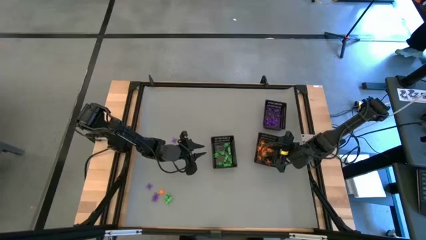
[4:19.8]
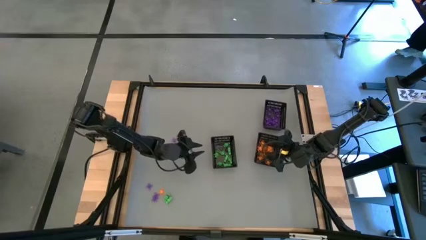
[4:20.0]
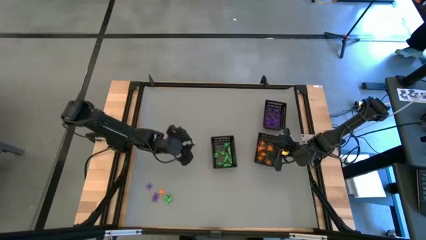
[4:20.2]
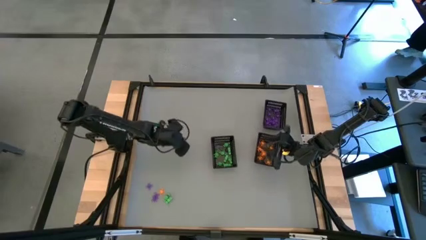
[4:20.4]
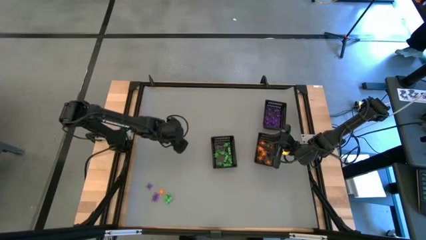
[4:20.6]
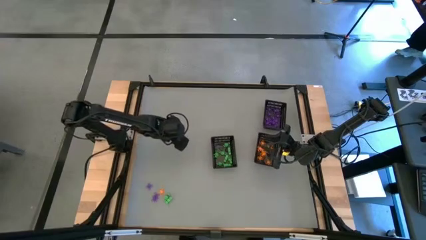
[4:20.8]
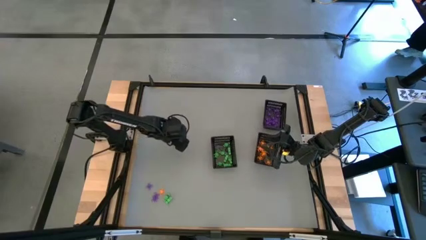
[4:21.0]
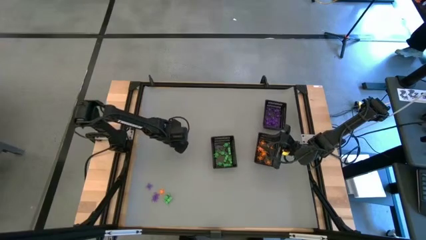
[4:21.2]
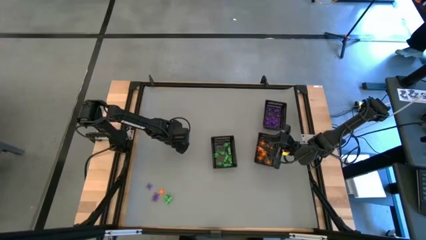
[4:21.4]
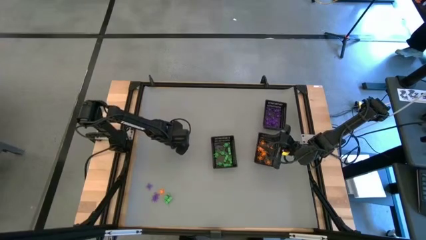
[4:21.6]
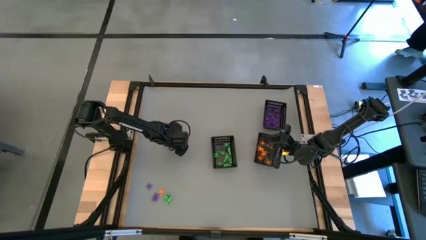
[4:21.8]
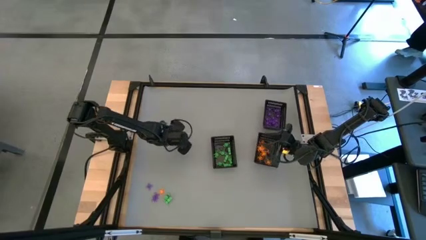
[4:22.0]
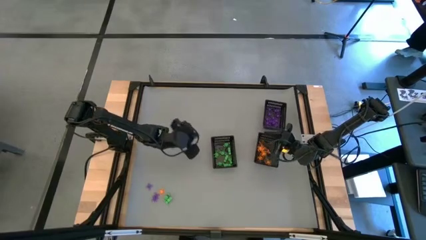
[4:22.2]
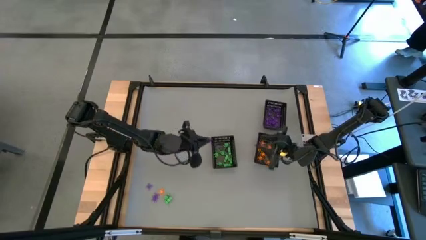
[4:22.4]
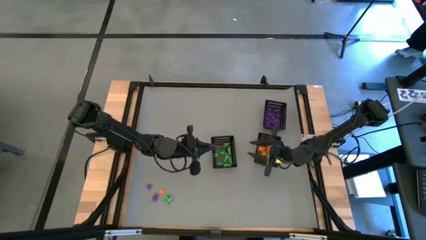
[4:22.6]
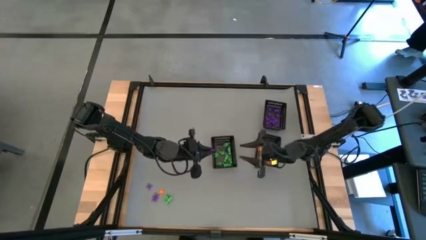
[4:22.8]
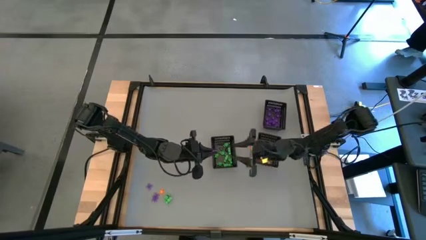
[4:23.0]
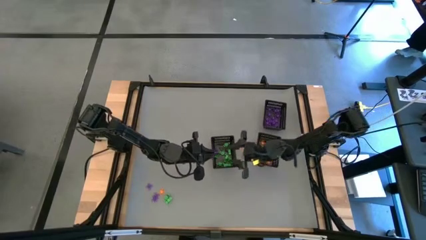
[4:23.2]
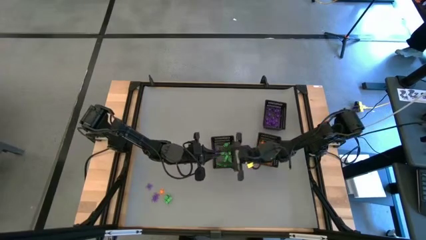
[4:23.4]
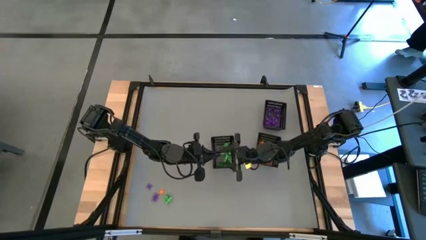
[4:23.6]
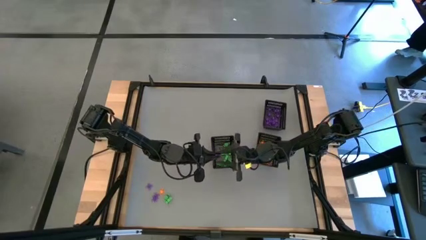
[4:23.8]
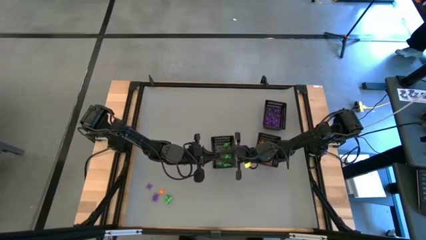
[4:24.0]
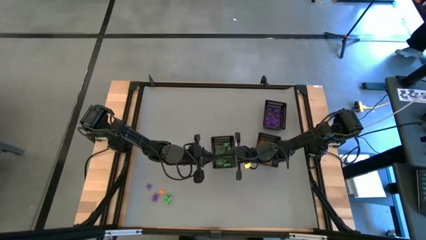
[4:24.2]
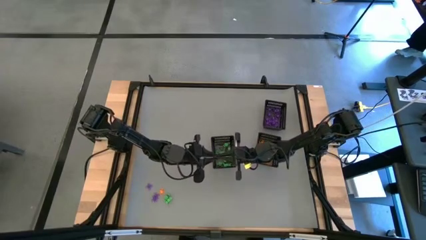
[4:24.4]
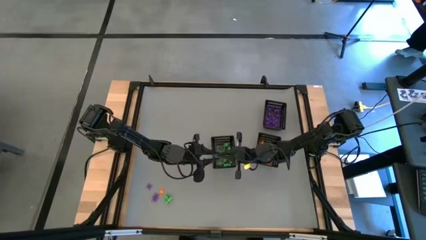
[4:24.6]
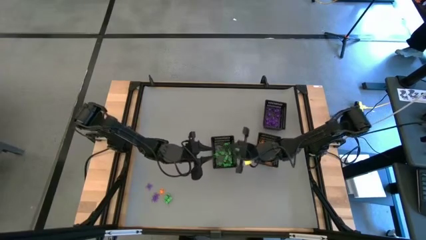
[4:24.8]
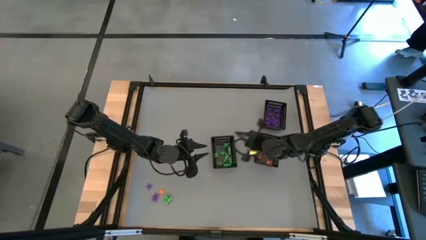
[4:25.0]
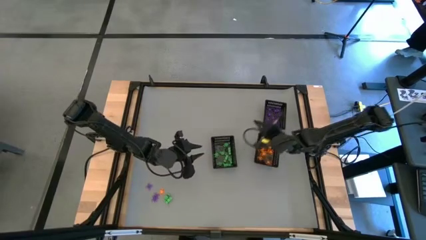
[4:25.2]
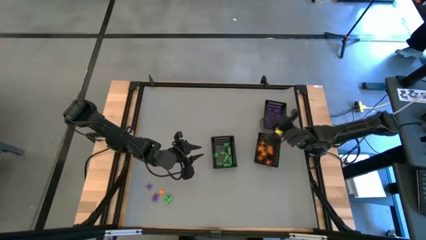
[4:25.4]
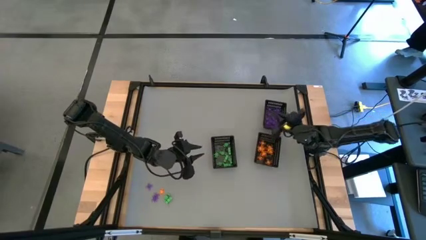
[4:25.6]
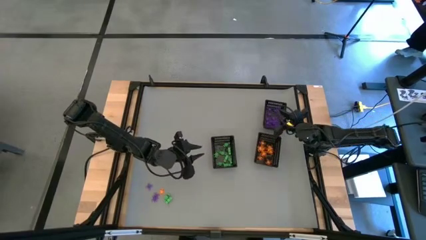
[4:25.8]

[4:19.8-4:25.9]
Task: Sort Halloween decoration
Put the purple spider toy into the top bin

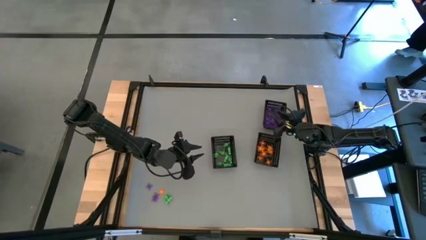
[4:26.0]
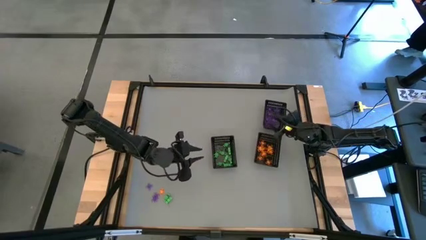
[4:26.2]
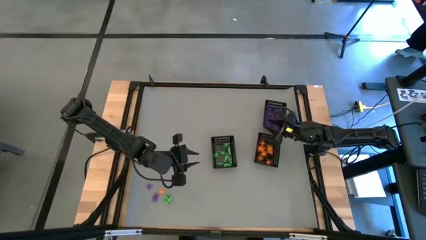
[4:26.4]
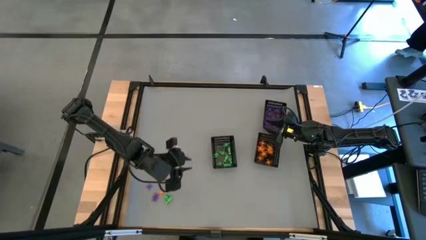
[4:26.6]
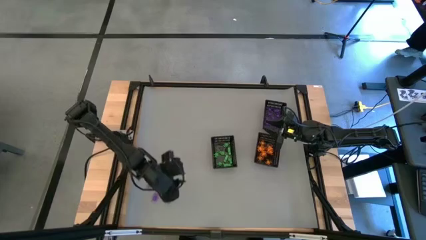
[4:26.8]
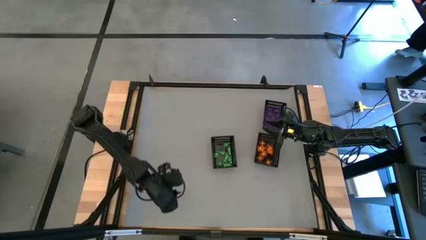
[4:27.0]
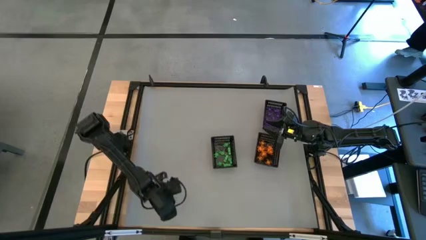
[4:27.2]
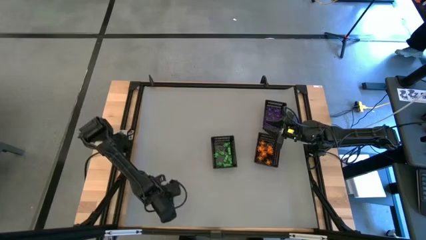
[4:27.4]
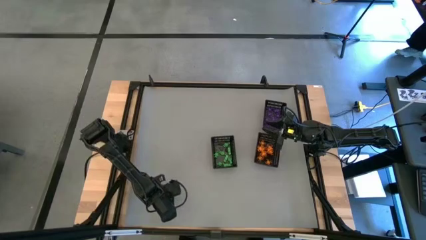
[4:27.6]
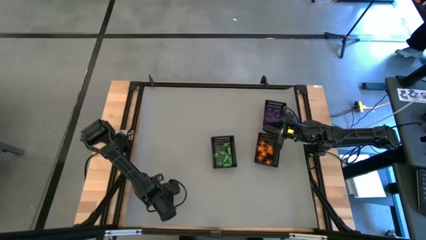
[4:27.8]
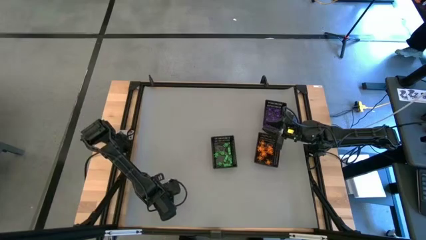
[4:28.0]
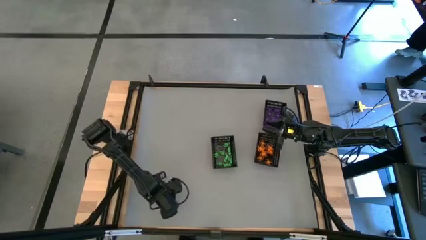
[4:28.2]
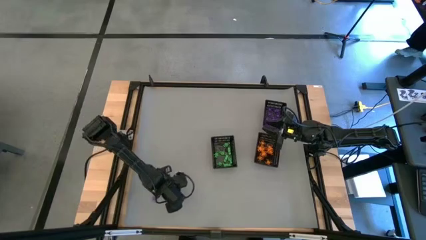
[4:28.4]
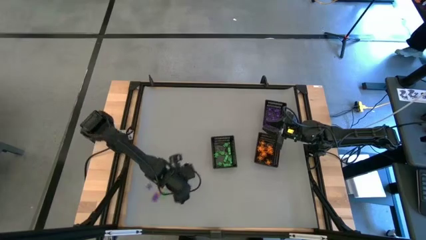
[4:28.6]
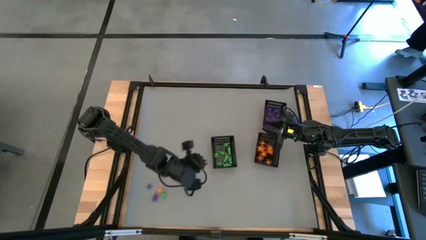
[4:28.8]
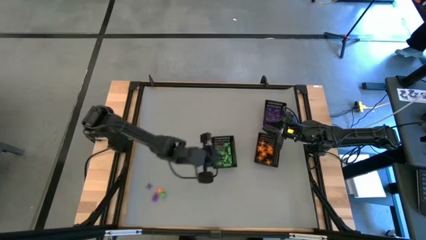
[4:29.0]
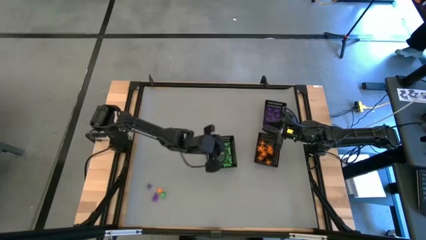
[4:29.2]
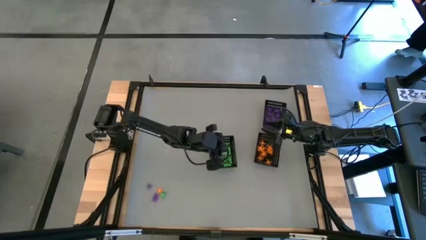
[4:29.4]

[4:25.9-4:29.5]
Put the right green skeleton toy into the bottom left bin

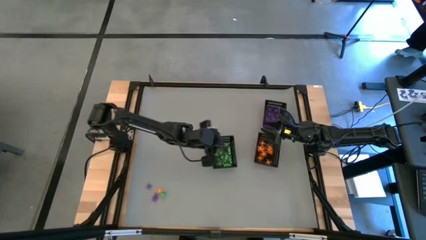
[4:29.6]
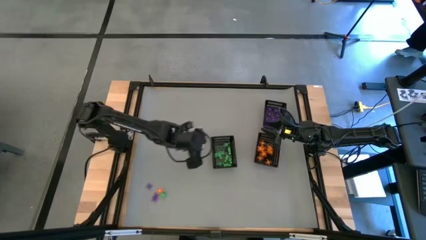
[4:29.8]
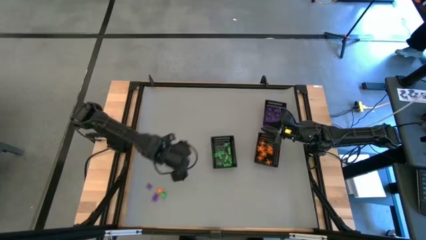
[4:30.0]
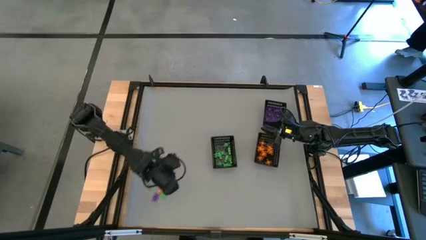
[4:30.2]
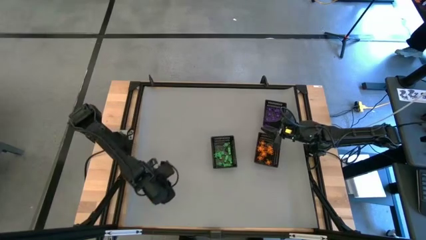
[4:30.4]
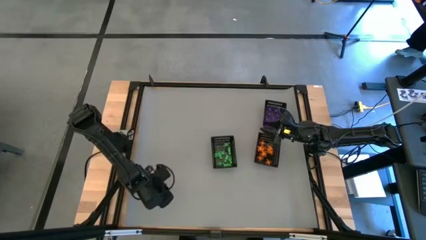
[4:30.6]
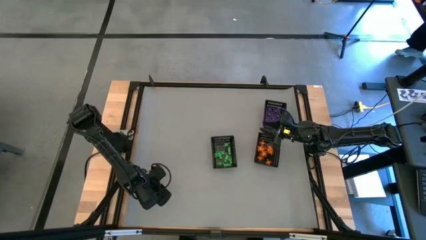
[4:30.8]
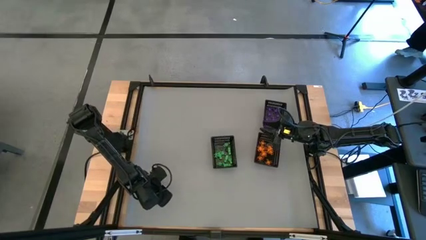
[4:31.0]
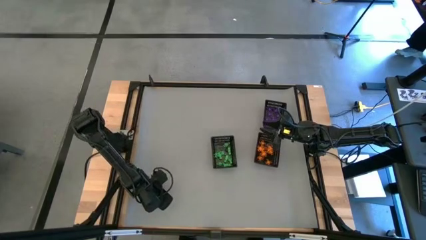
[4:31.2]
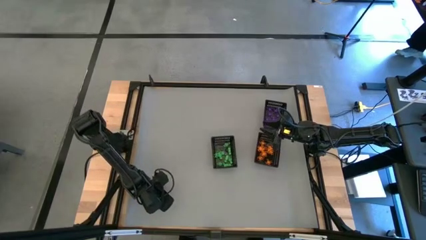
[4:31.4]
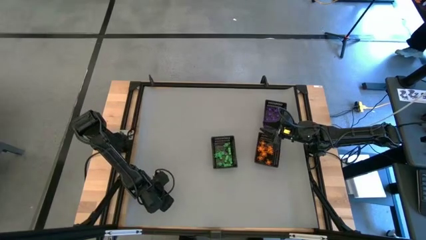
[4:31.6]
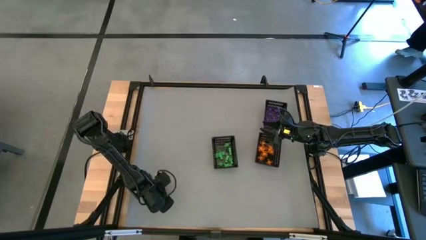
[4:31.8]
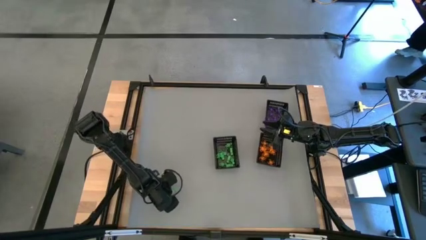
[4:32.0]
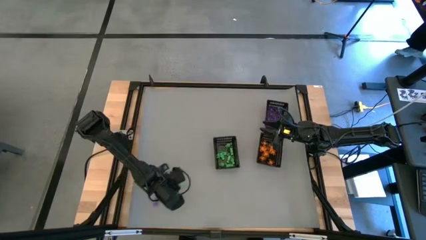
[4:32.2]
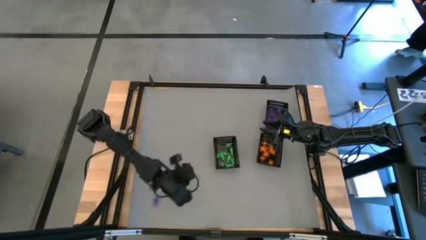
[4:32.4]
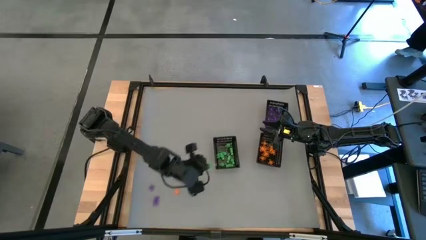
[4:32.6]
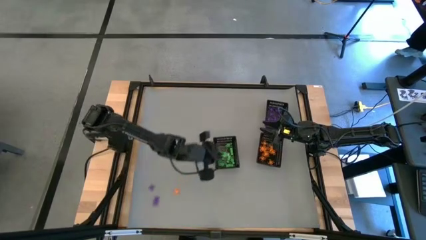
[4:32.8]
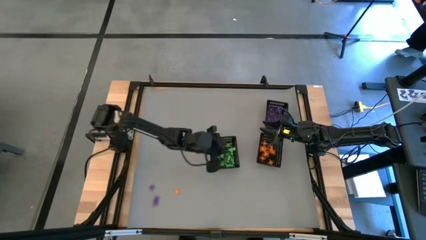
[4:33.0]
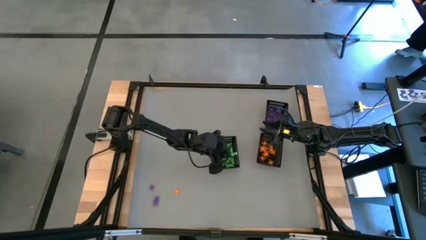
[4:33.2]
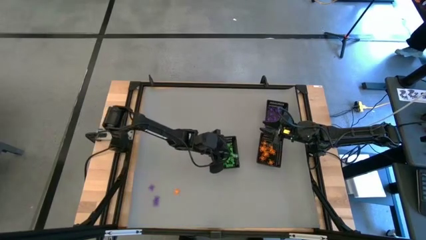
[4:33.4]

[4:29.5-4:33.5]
Put the green skeleton toy into the bottom left bin
